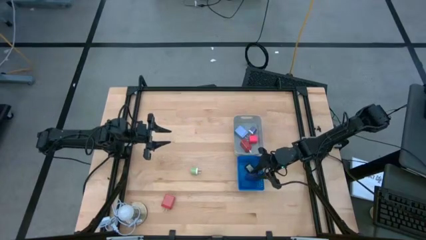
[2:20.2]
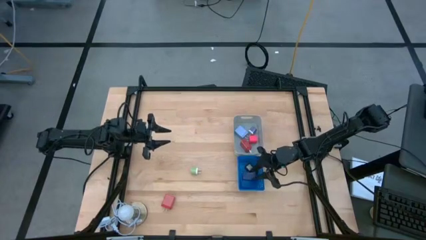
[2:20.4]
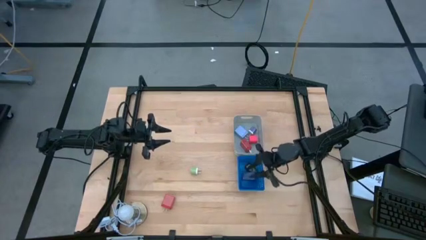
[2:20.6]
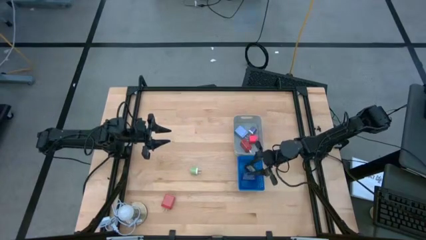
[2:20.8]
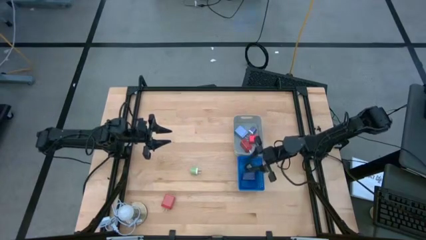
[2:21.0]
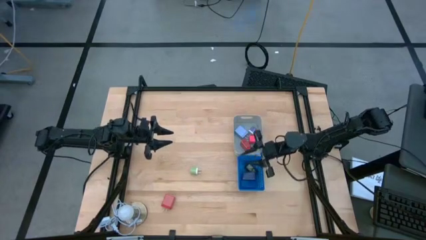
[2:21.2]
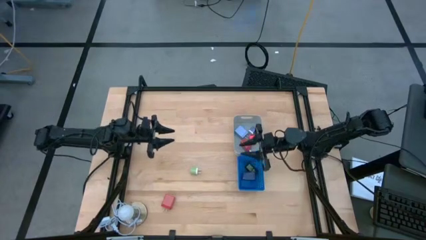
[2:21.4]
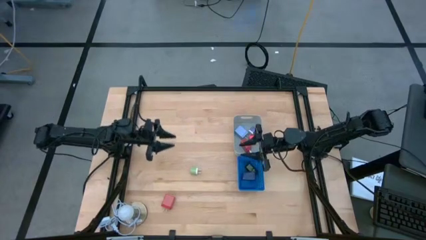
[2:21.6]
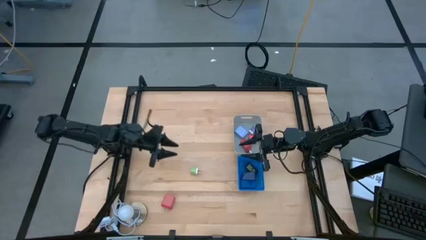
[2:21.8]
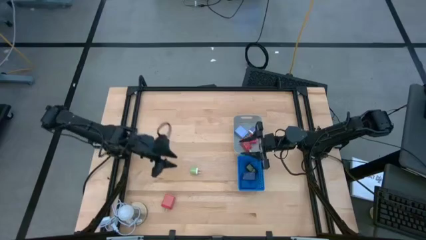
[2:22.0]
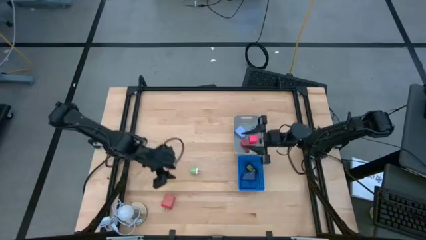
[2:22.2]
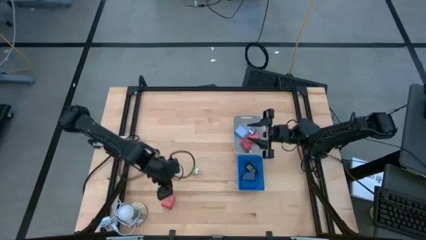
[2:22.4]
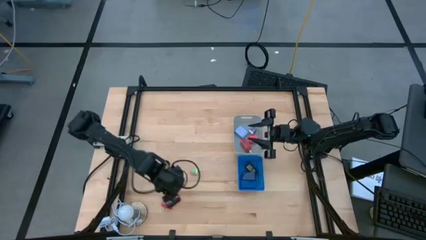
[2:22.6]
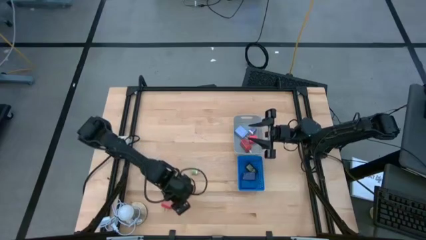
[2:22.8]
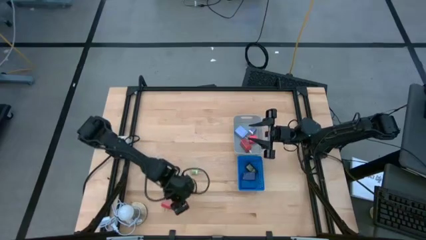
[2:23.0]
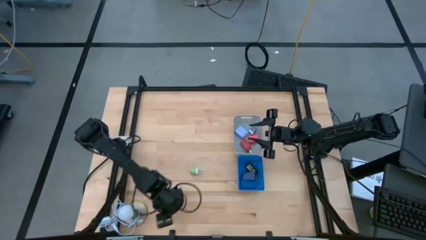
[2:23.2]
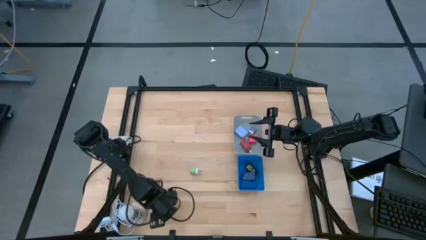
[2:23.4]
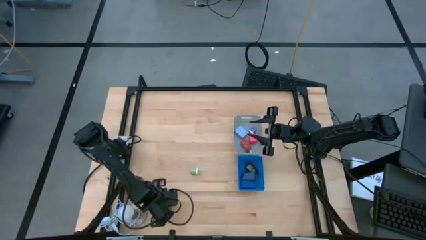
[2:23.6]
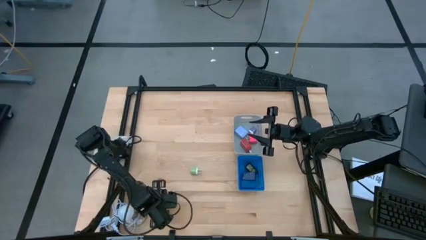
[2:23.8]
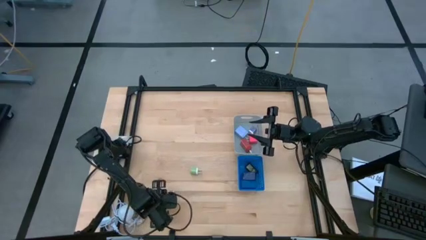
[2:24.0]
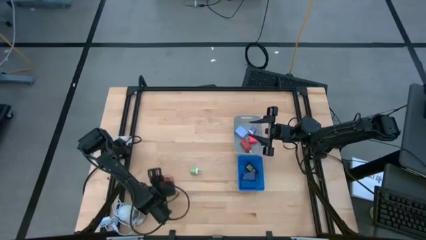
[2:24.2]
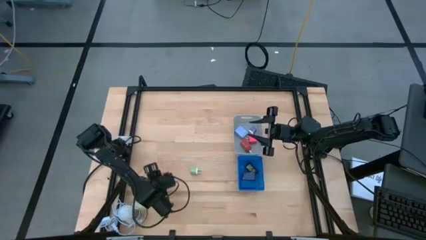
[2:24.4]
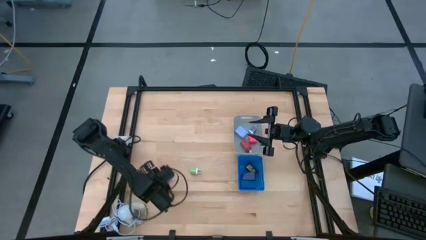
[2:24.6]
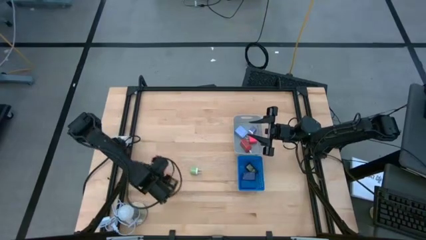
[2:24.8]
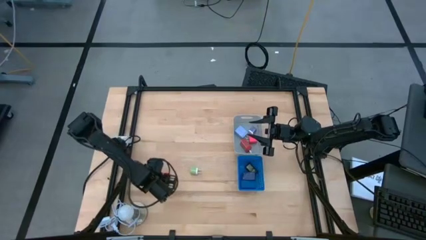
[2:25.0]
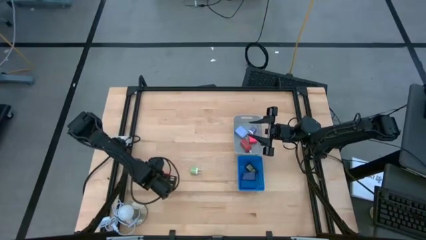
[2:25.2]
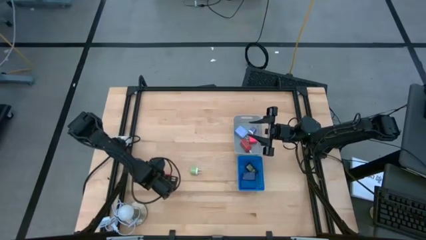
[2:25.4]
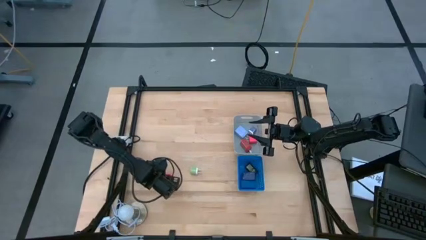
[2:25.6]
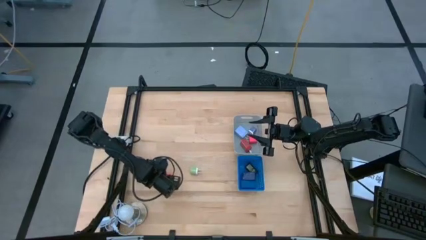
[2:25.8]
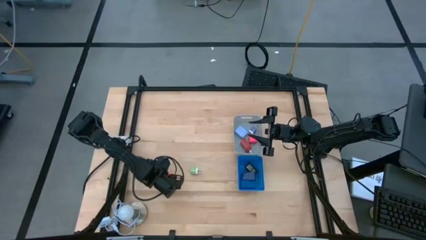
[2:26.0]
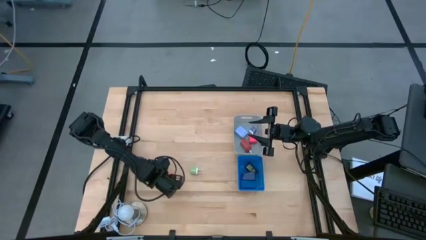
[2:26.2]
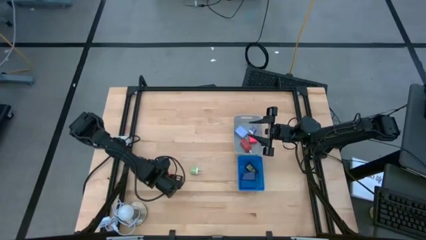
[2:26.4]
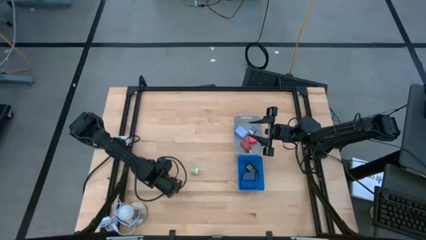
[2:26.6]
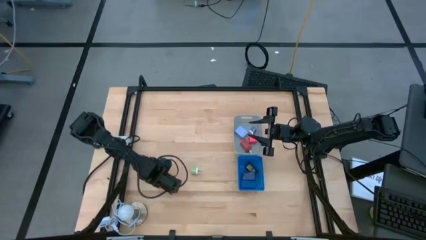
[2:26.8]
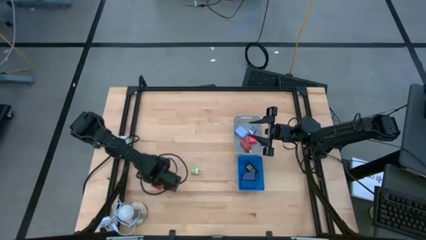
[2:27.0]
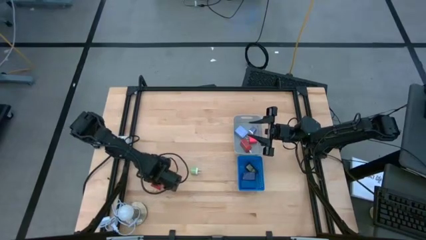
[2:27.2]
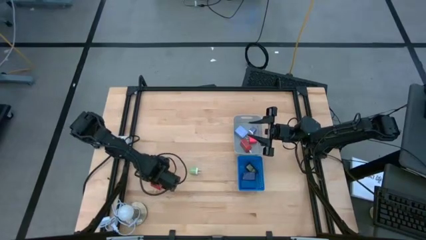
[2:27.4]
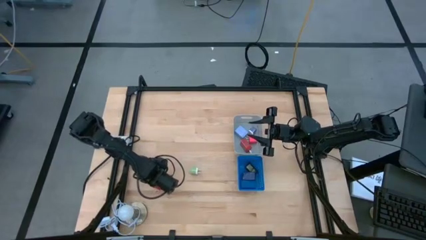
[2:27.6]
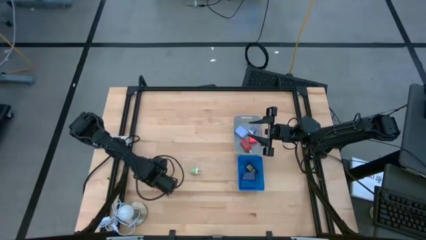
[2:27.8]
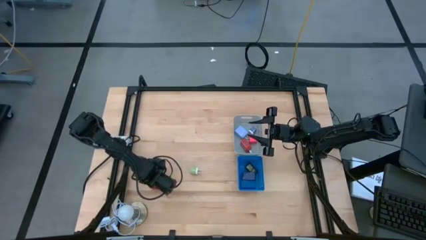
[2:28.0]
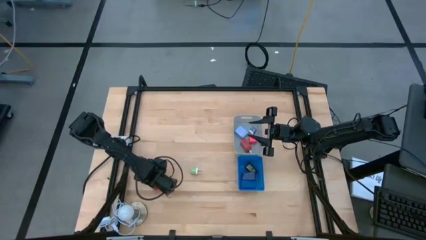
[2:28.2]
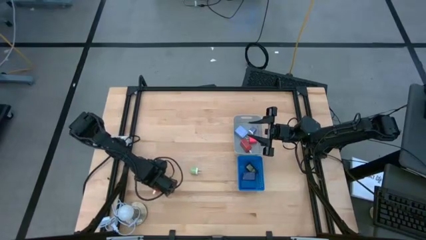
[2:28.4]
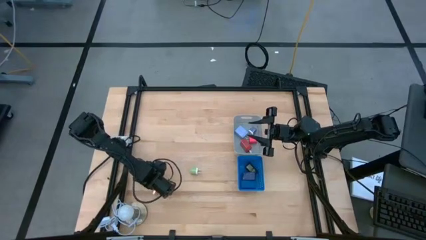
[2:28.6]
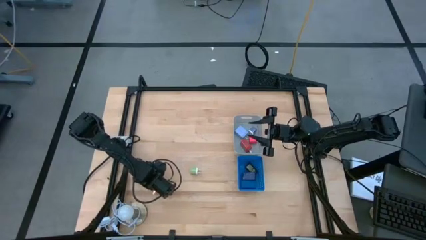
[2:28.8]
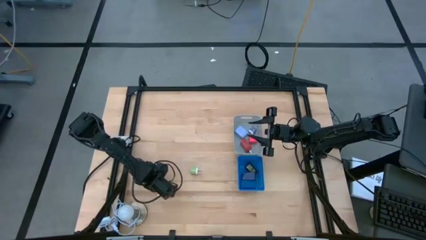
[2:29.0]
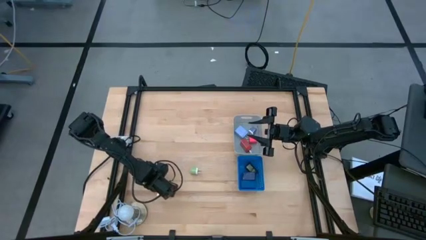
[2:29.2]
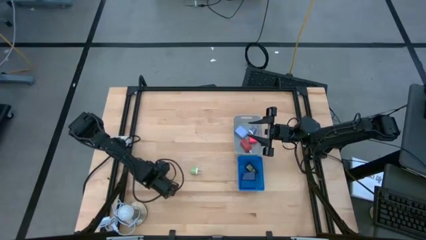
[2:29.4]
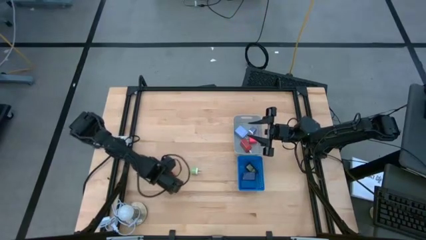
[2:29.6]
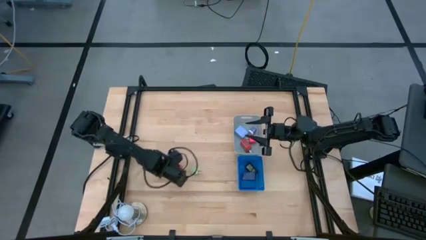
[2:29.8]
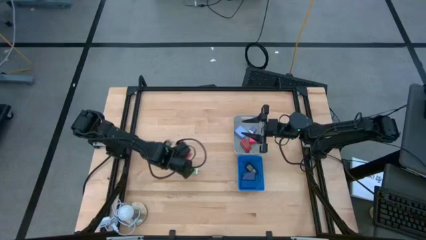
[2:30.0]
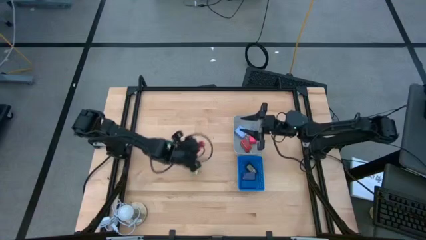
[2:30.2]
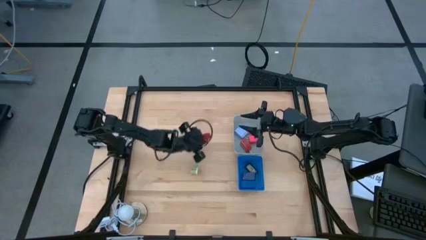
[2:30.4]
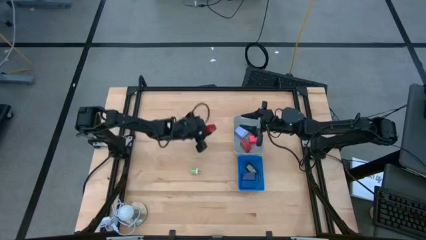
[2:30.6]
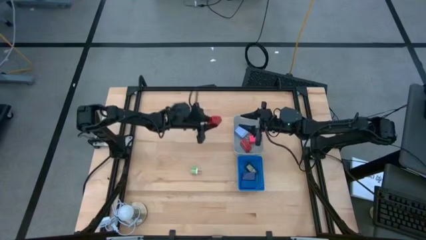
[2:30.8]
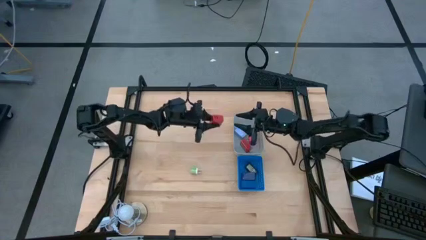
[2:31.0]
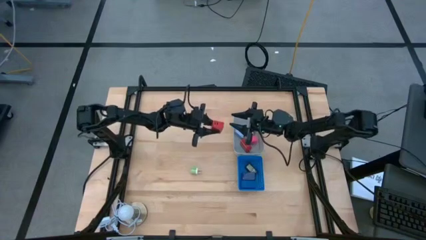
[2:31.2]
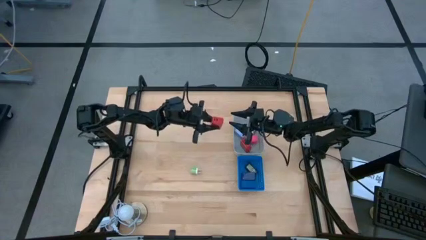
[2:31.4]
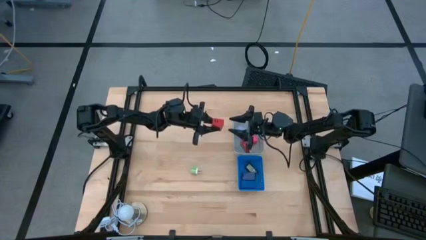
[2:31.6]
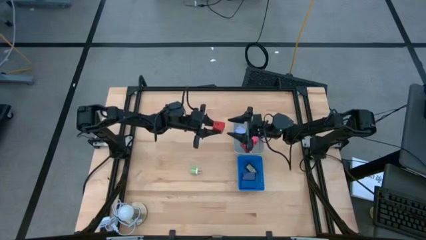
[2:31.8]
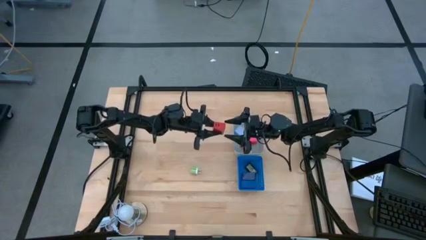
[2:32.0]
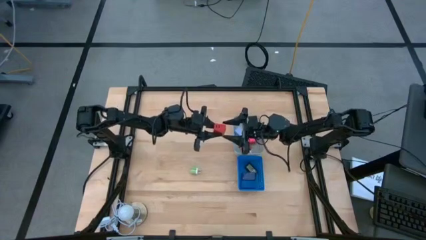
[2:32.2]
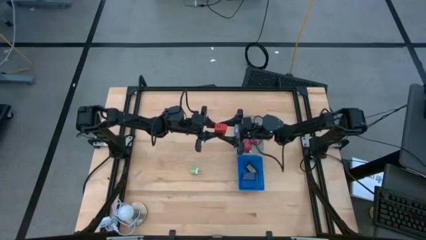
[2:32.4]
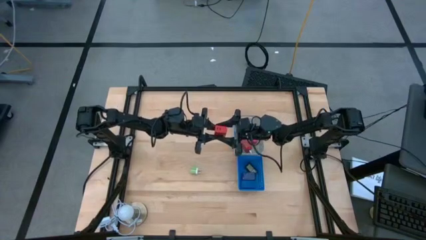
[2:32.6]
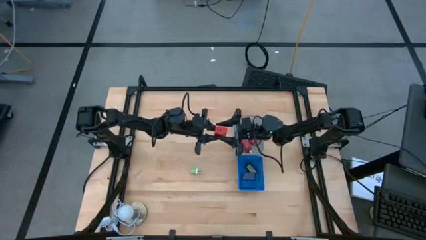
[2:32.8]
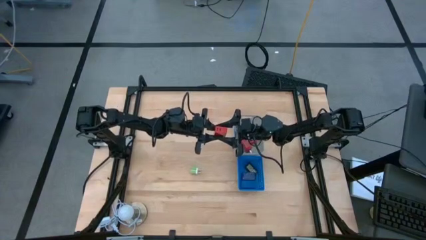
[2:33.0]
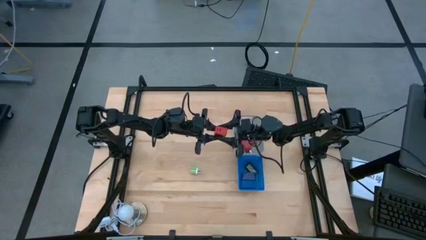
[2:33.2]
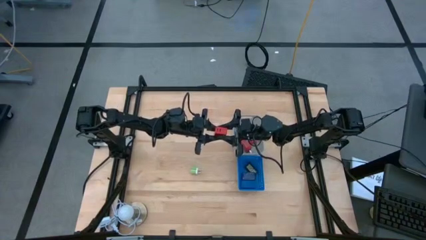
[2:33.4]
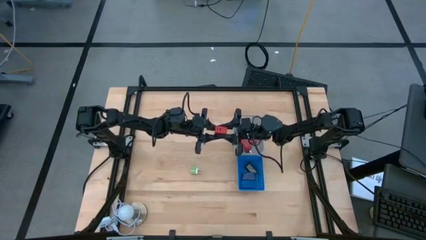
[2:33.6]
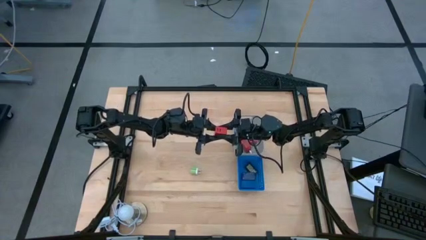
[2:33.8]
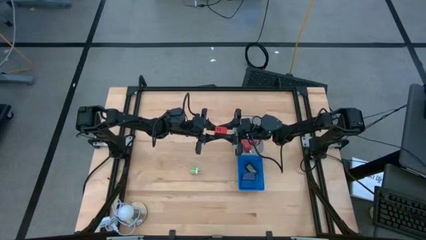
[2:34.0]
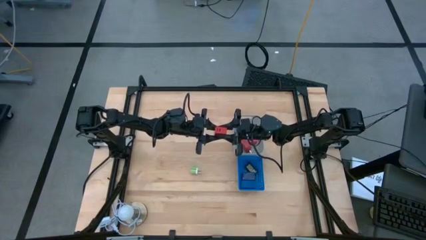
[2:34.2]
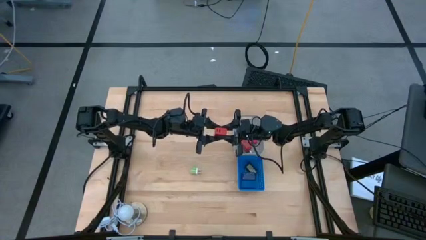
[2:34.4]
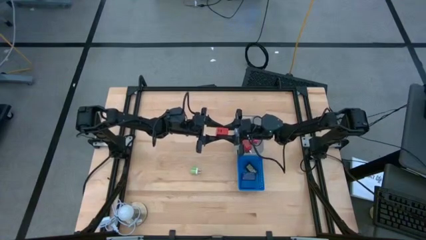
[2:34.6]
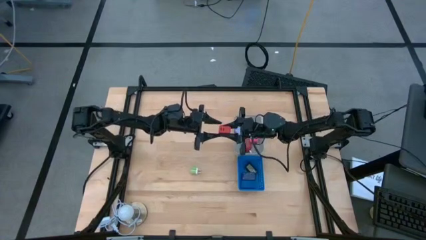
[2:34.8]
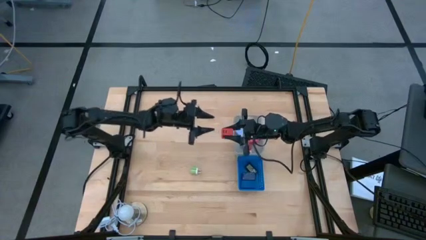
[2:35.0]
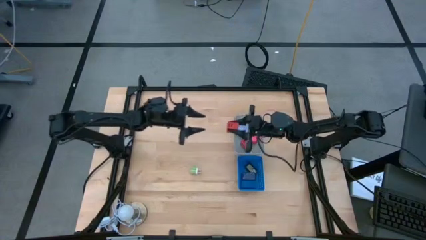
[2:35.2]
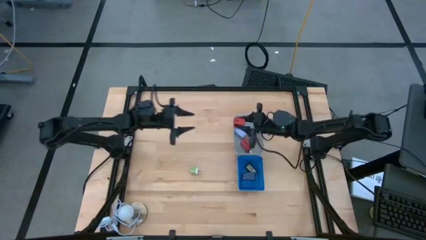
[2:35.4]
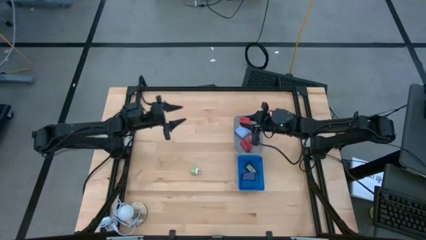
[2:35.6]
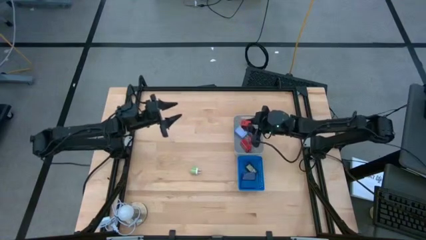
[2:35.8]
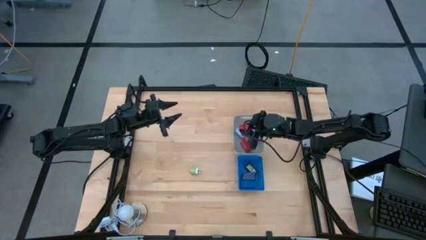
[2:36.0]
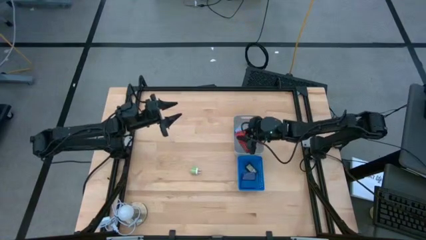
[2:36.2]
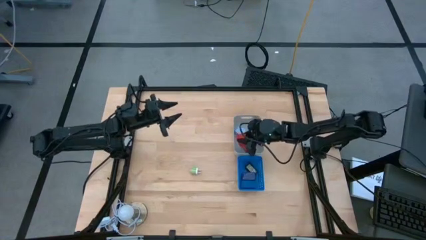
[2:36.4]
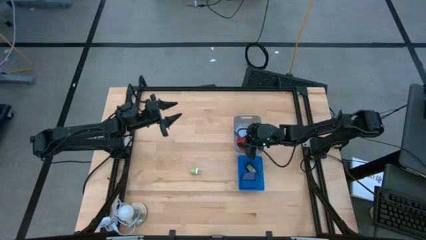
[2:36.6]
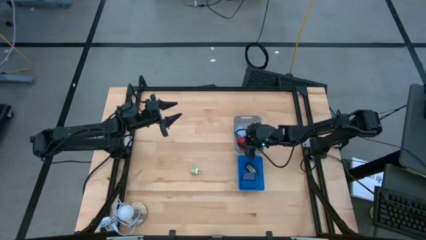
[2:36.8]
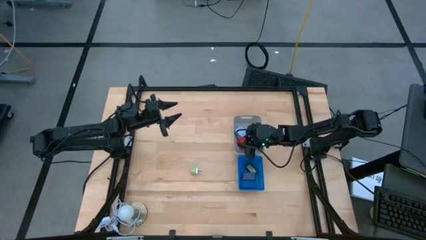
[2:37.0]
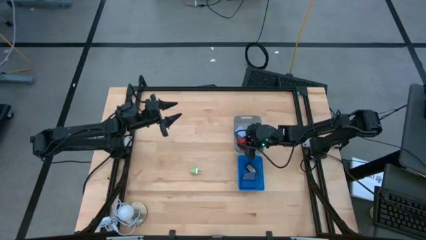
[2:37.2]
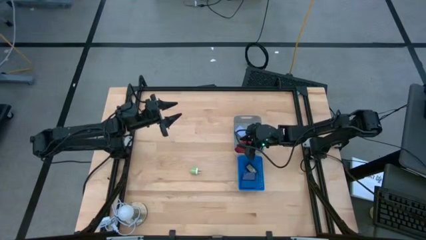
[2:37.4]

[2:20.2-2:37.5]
Task: Pick & Place Office items
Put the red charger adapter into the gray bin
